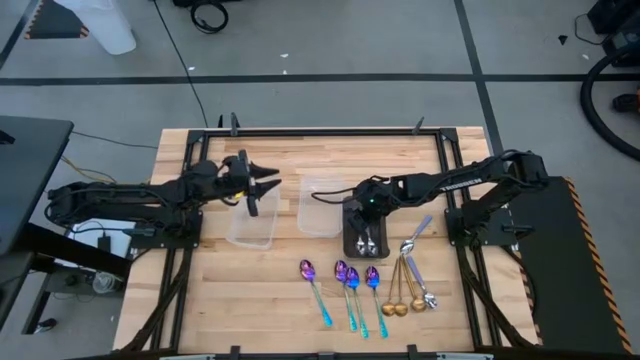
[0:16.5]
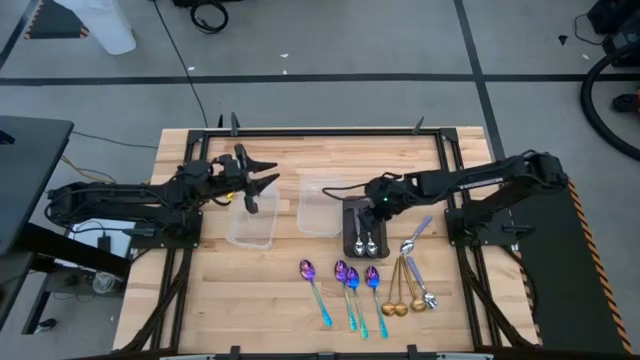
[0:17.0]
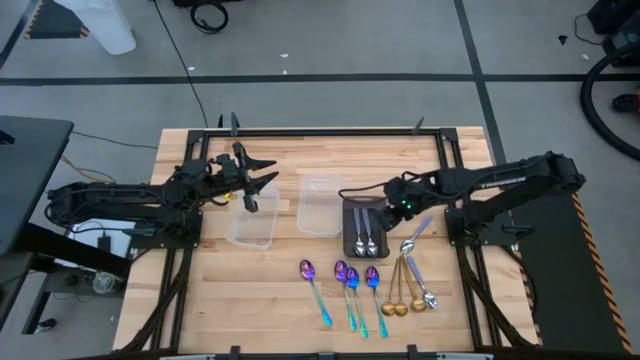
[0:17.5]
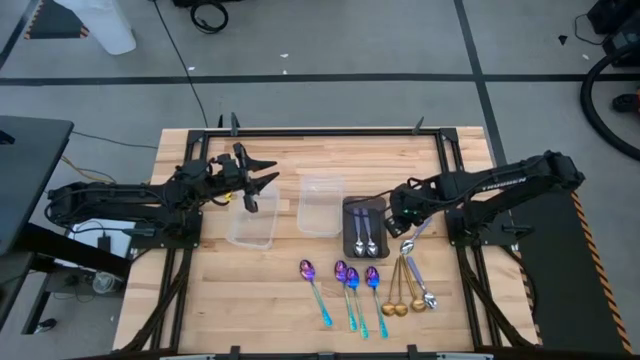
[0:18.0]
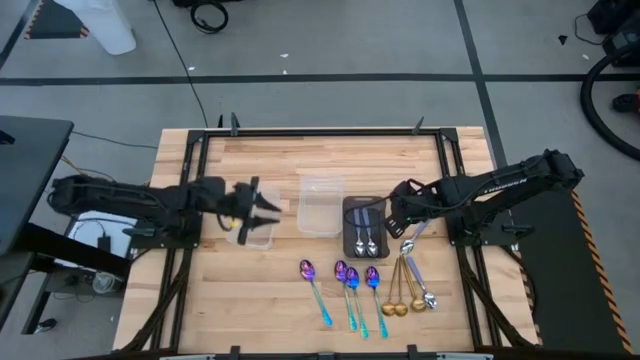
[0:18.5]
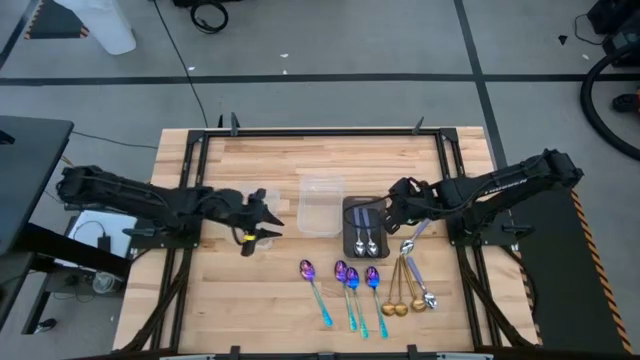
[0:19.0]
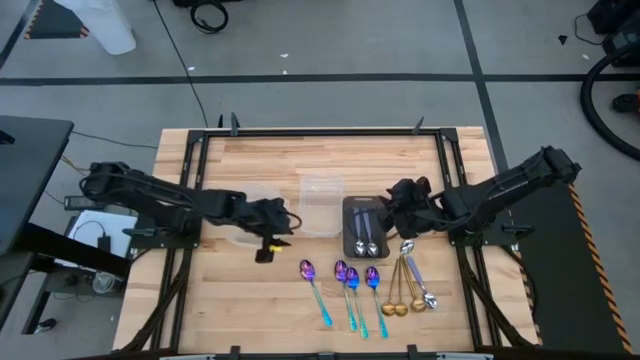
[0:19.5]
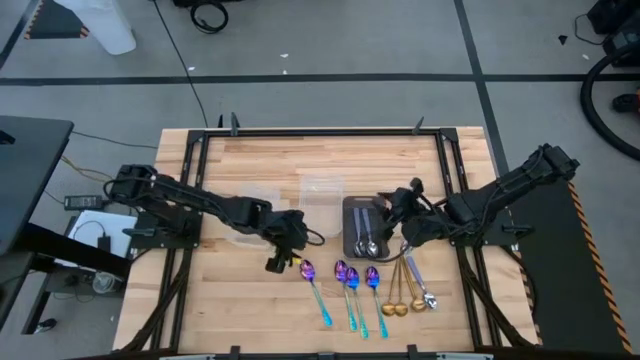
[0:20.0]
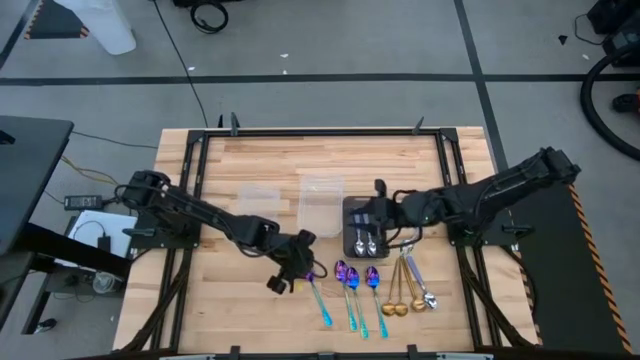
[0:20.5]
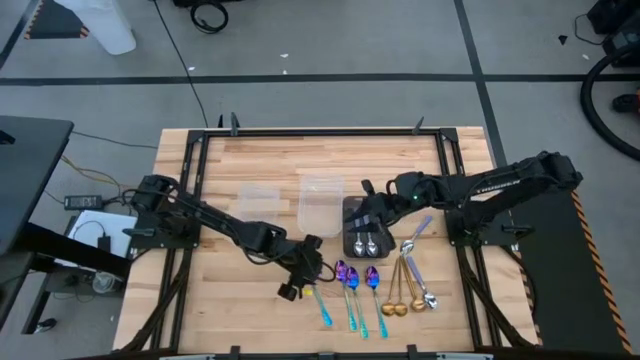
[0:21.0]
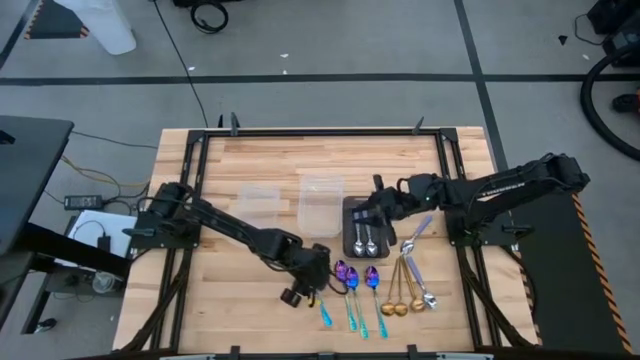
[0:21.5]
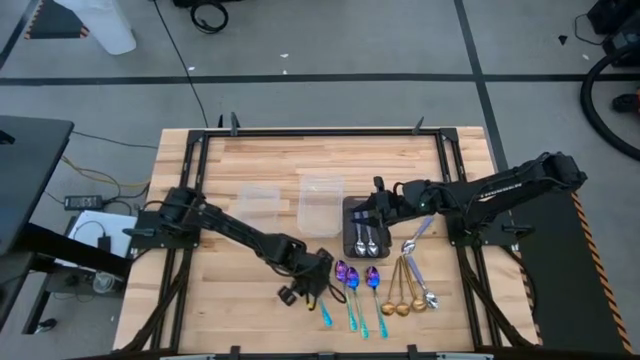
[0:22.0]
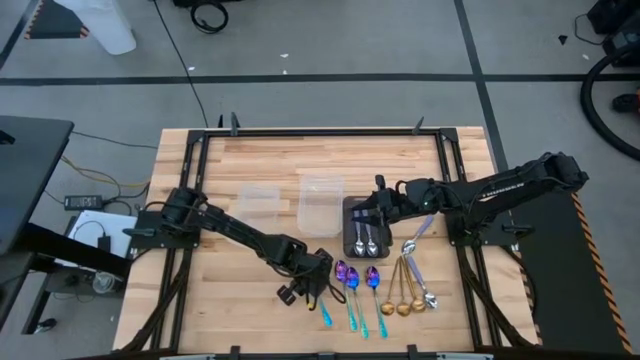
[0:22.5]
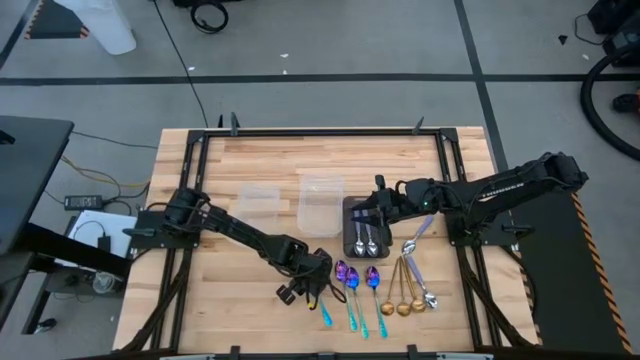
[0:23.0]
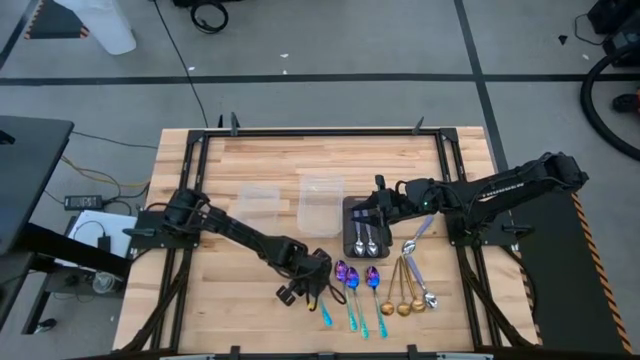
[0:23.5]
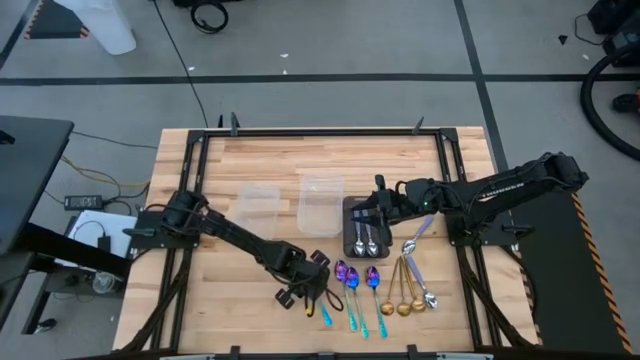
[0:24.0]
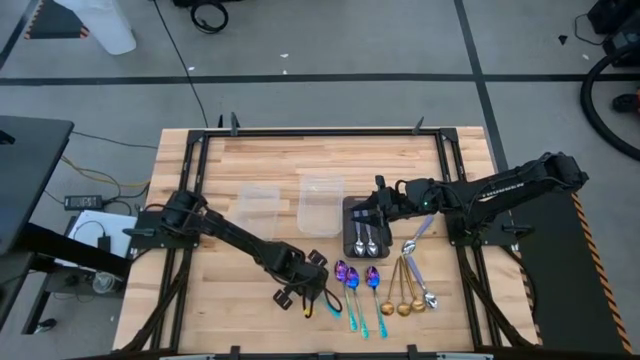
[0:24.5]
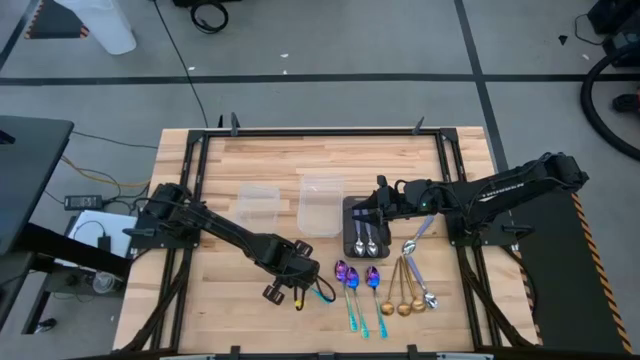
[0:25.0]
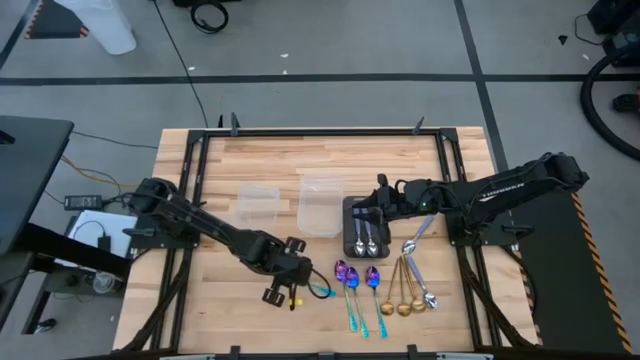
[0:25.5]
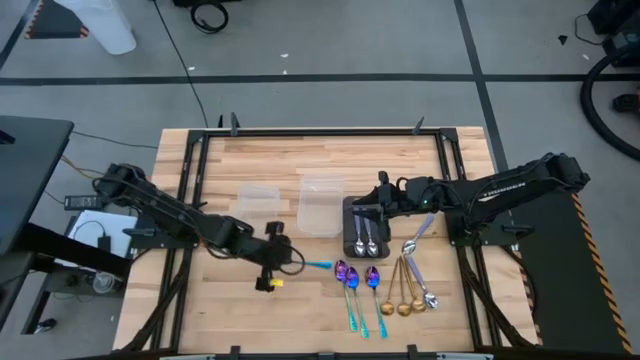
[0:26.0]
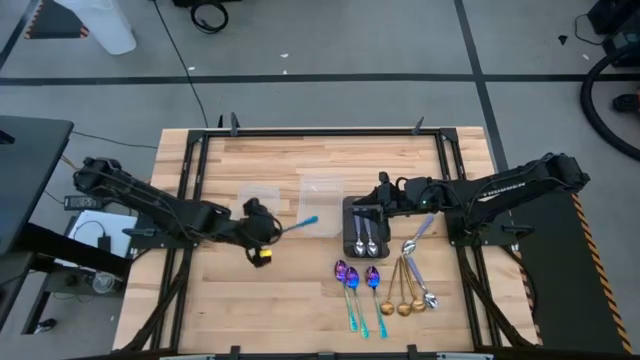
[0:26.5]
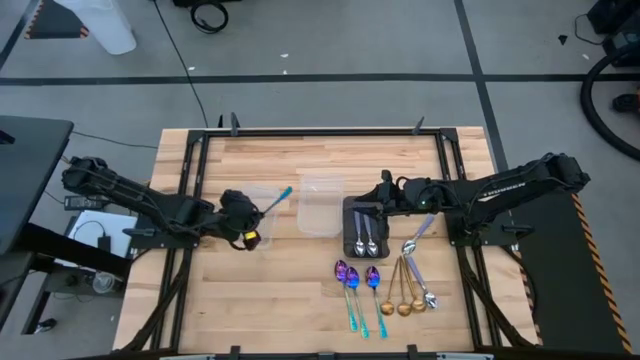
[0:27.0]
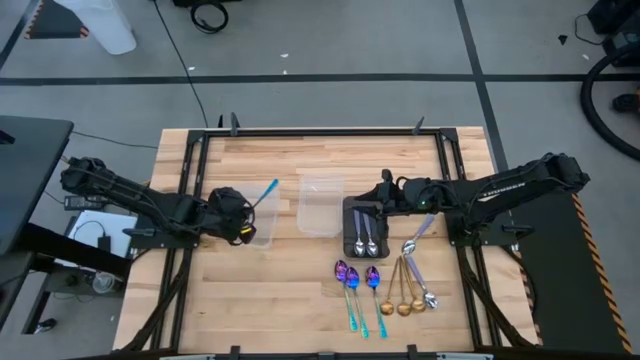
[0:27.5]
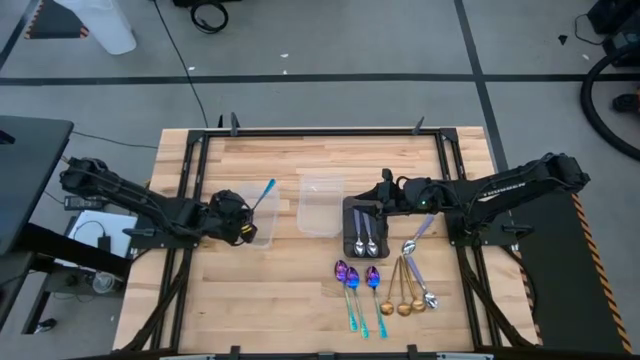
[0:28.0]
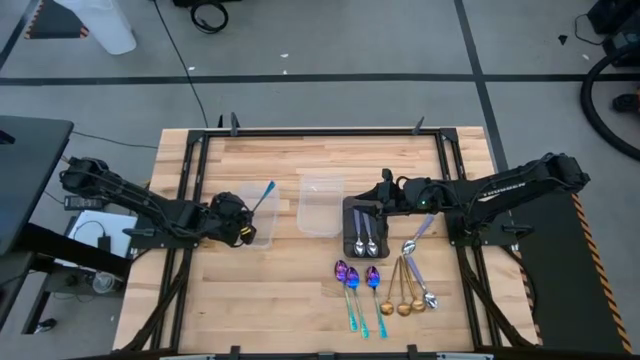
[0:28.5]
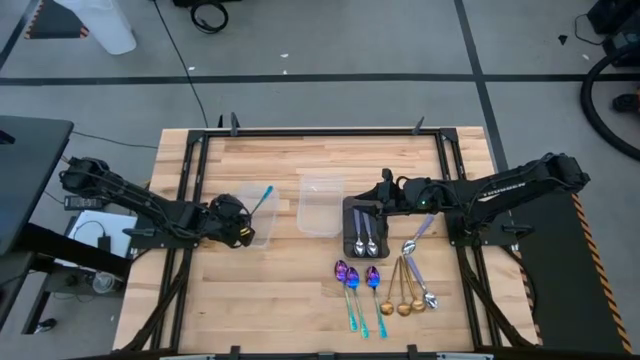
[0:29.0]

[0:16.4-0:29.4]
Task: Sort silverware by color (type)
Put the blue spoon into the left transparent bin
